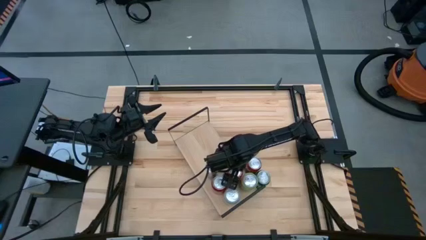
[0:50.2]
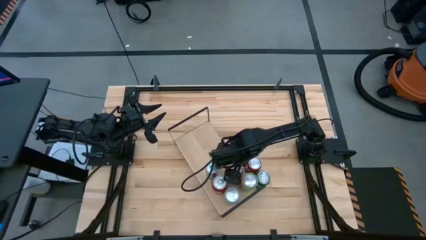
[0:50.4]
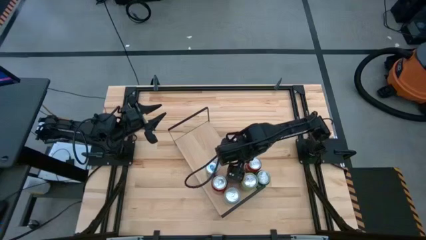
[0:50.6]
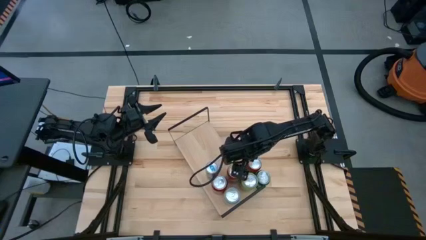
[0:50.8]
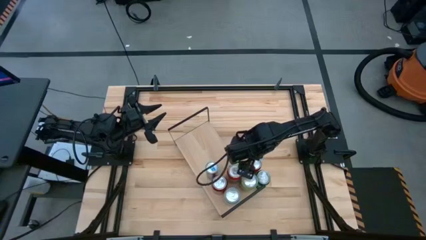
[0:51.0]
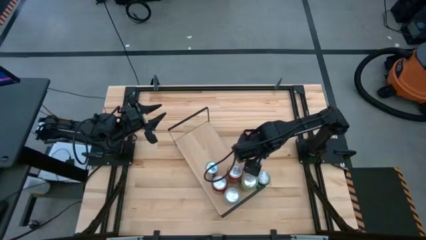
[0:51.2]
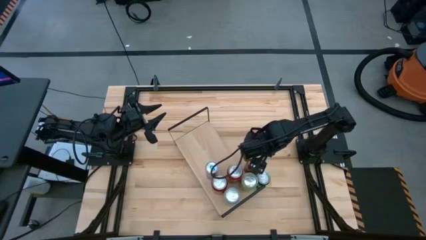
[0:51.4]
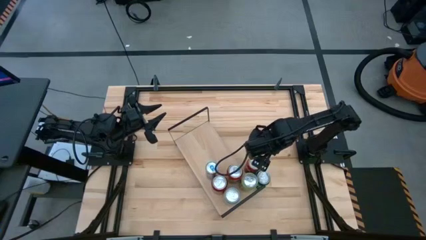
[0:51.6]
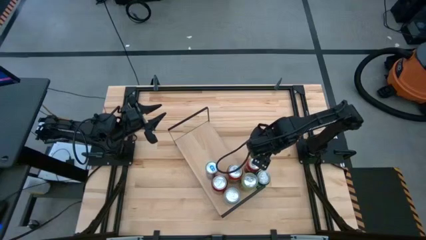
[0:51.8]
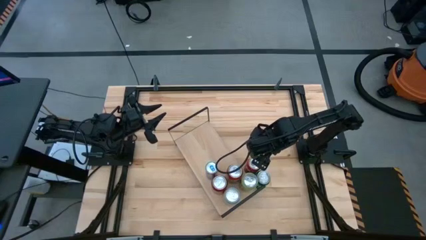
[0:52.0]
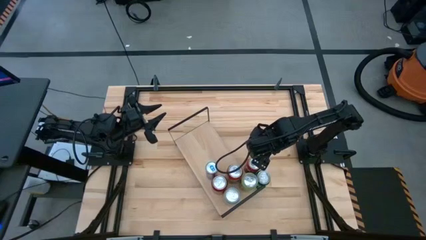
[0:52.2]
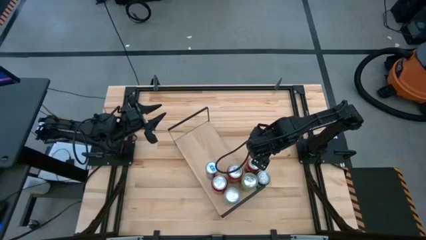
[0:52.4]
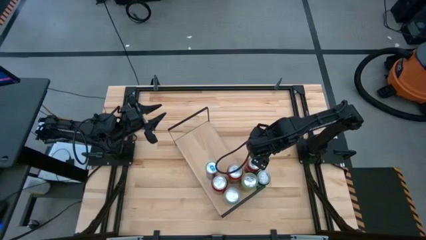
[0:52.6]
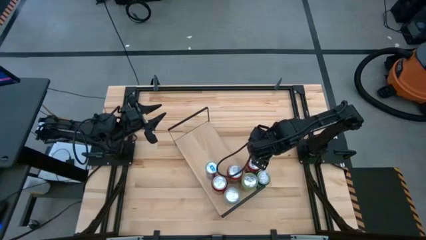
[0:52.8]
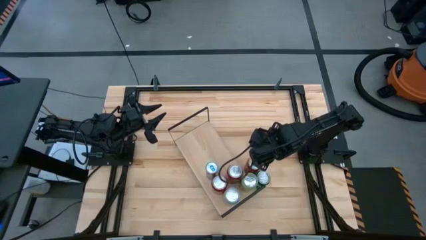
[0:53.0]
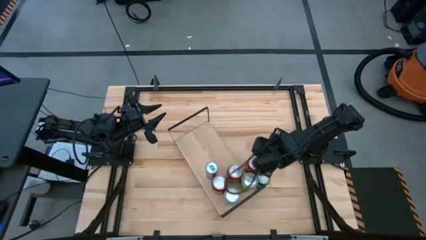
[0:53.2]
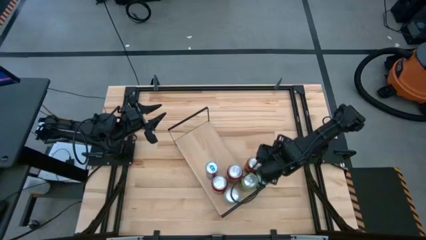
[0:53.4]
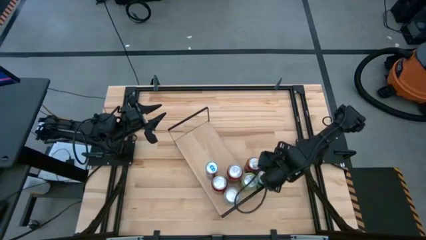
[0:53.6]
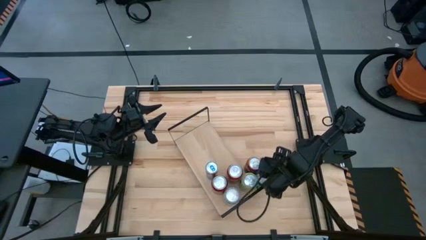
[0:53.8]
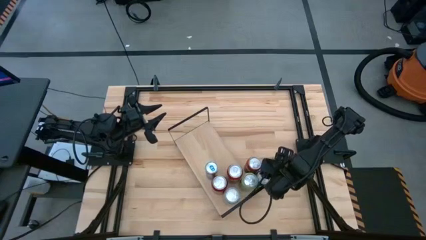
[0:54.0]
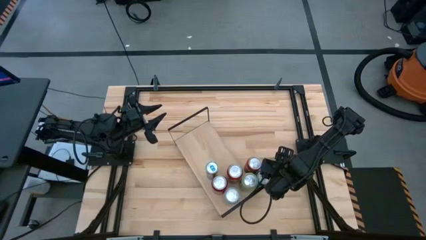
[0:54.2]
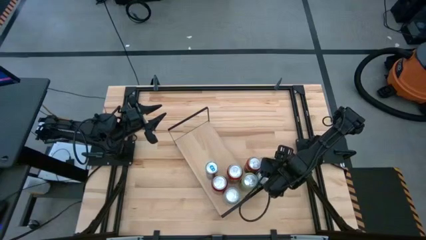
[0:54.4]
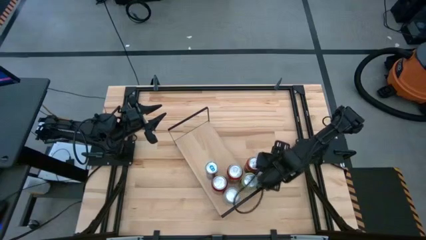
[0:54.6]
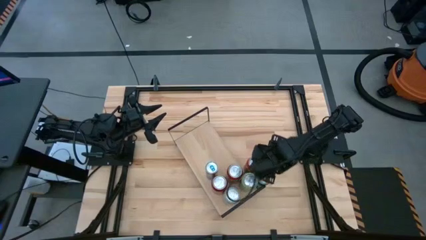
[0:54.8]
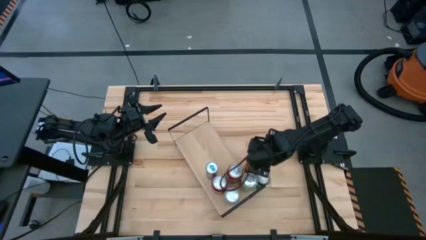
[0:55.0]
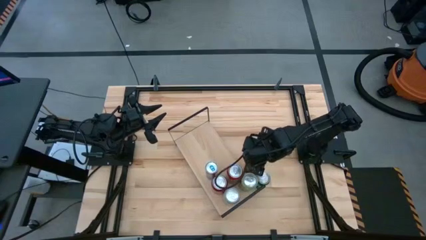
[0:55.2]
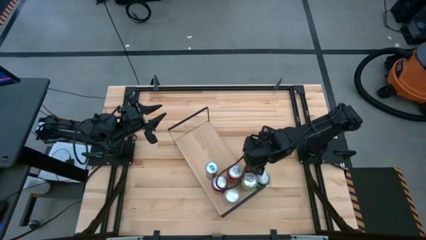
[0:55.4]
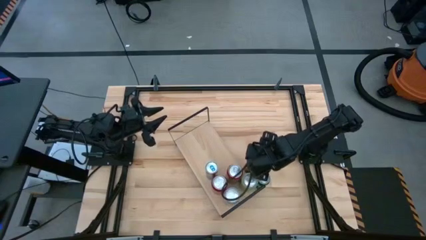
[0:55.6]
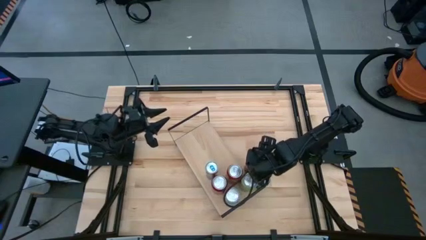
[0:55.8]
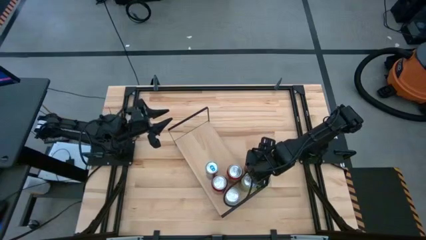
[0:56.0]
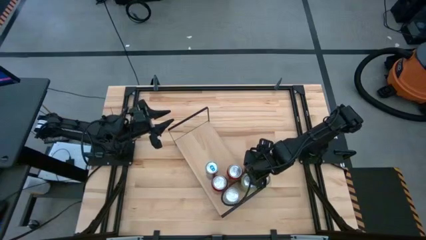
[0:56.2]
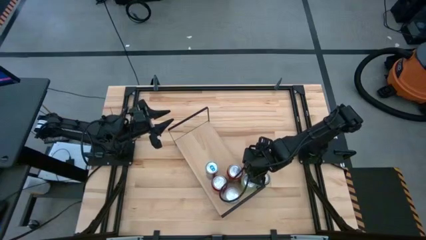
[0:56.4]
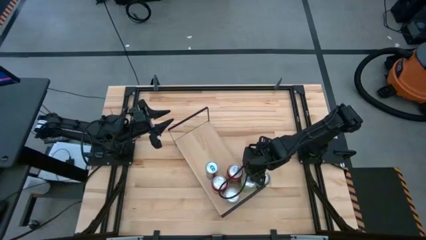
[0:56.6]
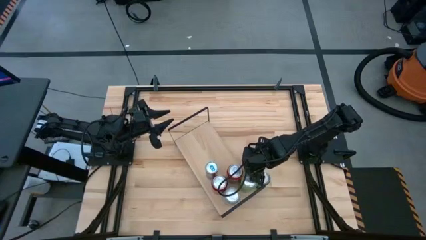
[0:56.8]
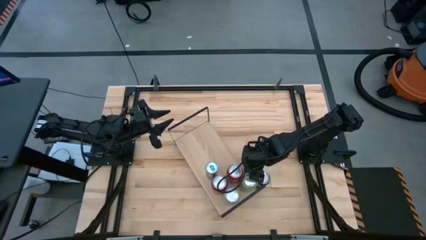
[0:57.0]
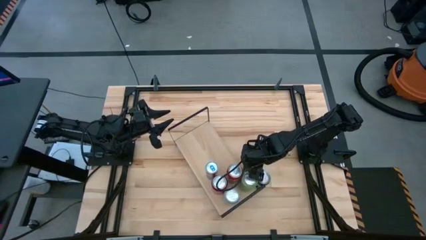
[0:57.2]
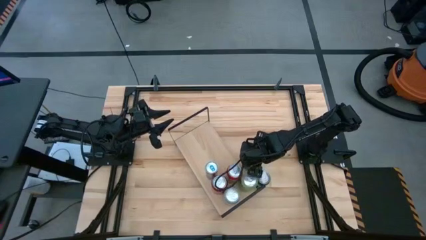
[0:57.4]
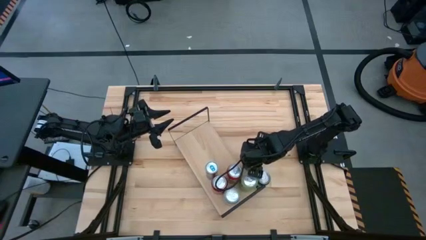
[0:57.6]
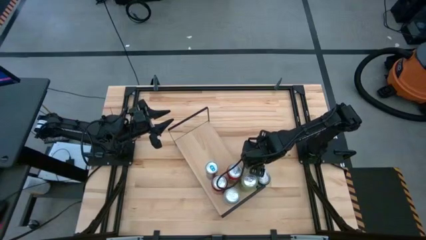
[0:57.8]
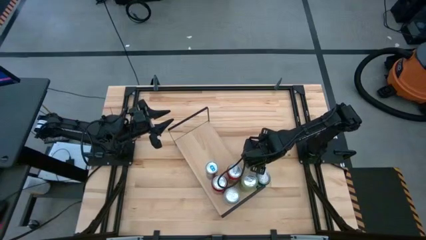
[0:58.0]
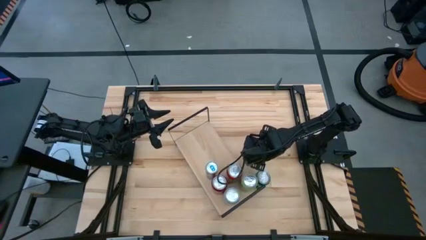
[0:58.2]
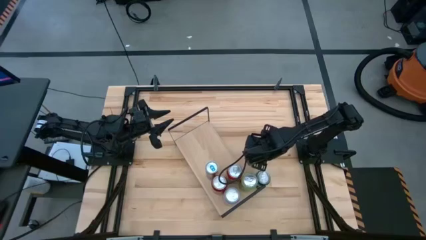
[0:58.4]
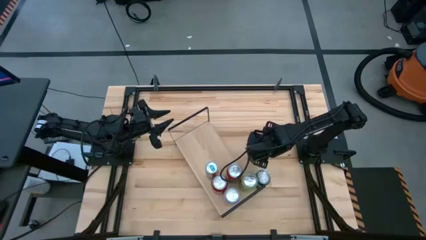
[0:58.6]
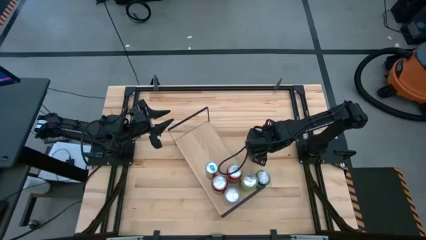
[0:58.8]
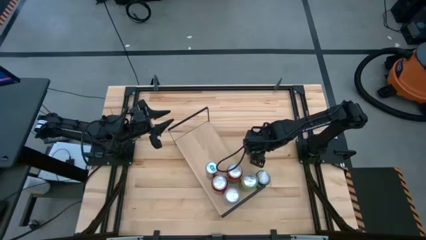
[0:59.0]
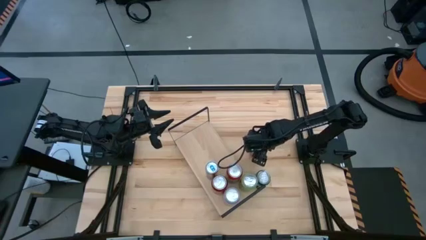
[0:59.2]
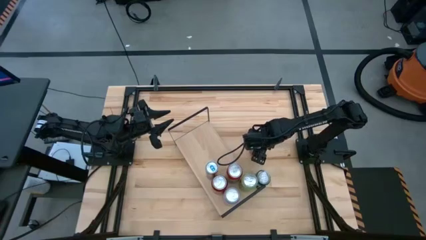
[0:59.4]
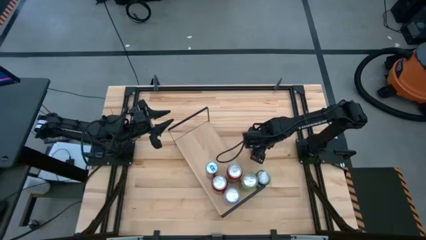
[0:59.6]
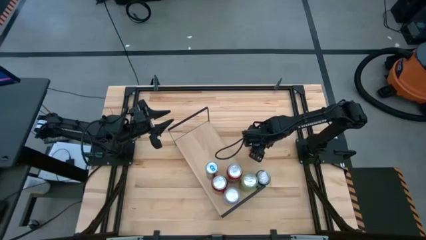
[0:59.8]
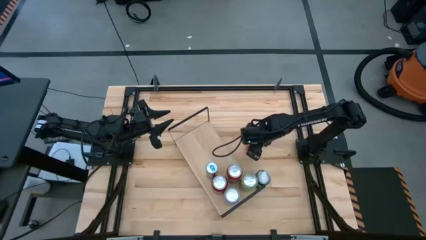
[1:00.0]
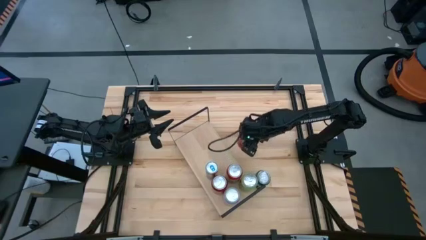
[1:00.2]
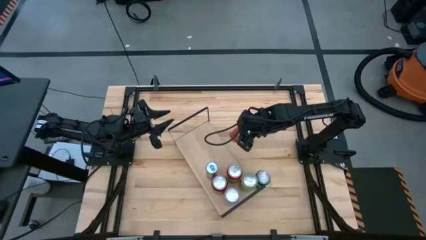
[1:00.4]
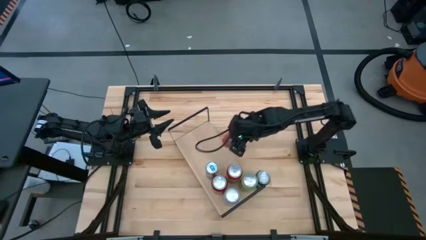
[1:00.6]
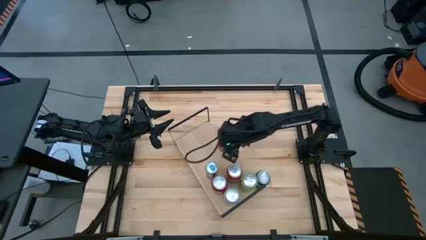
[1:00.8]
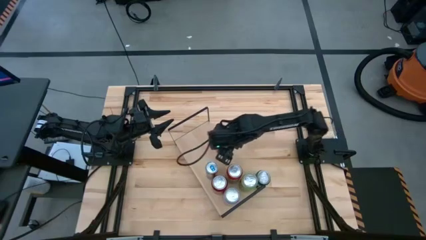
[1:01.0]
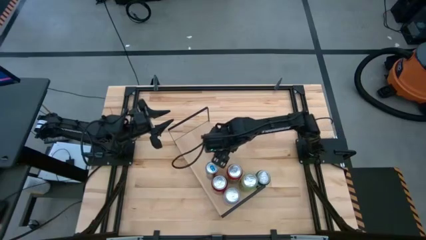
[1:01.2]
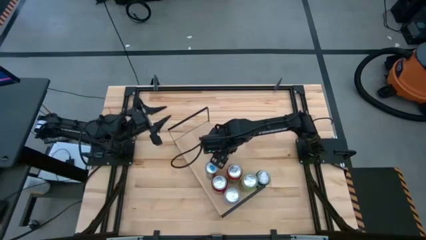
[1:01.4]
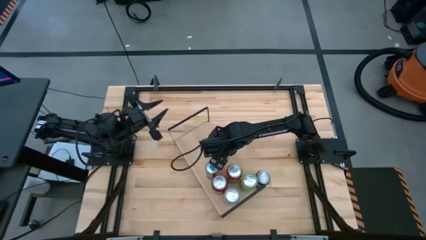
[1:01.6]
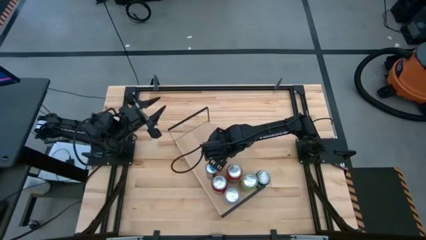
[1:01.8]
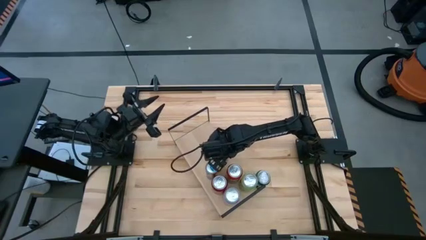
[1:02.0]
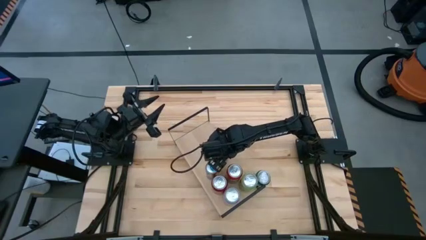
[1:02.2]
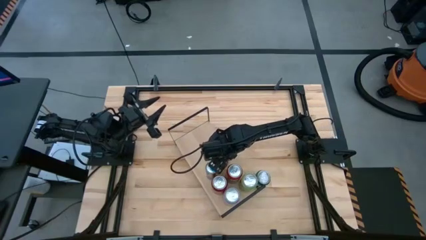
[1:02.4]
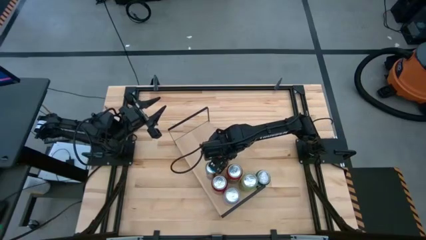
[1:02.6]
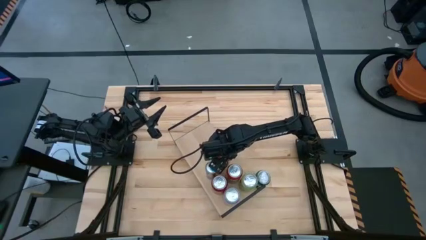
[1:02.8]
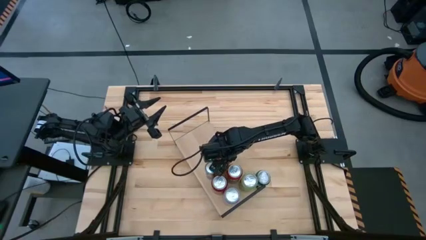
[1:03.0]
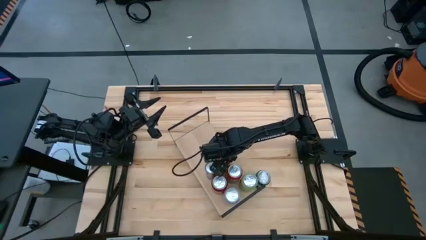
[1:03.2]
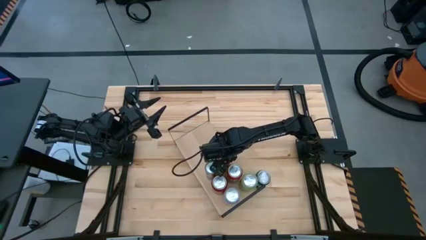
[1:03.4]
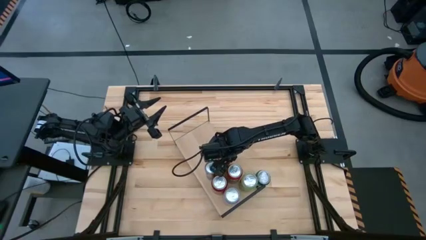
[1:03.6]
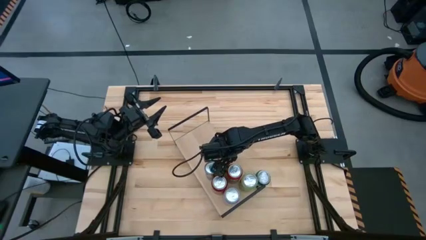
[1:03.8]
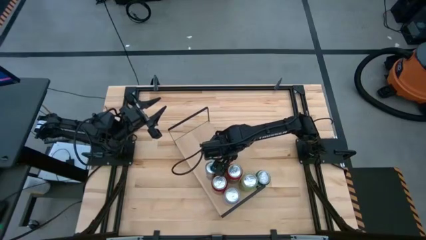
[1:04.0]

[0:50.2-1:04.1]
Task: Place canned beverage on shelf
Put the orange soda can on the shelf

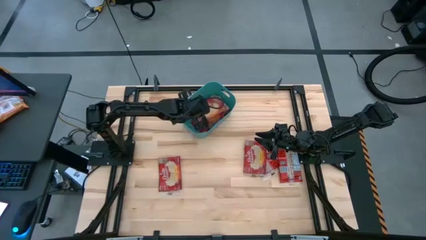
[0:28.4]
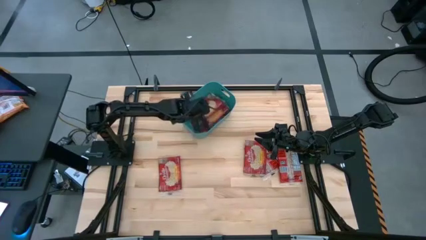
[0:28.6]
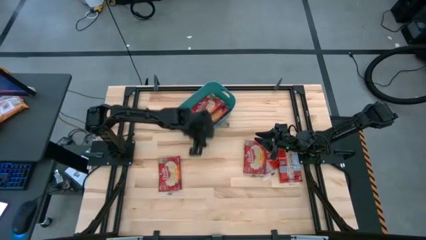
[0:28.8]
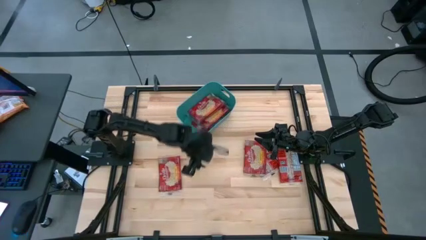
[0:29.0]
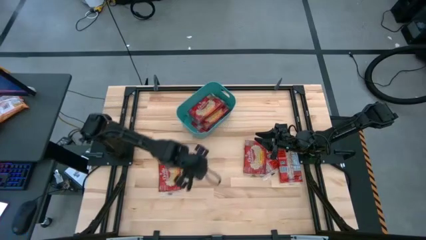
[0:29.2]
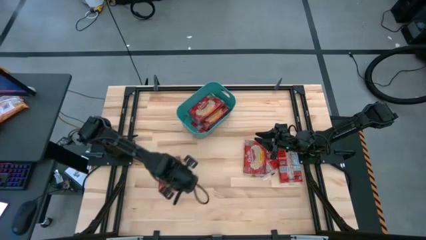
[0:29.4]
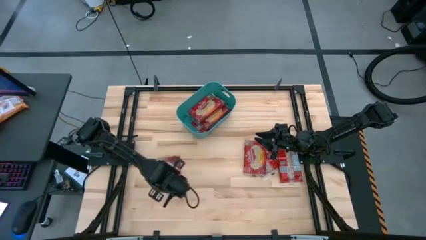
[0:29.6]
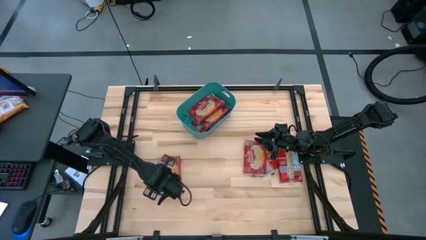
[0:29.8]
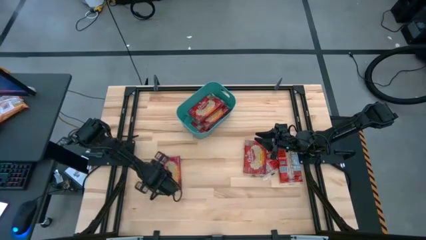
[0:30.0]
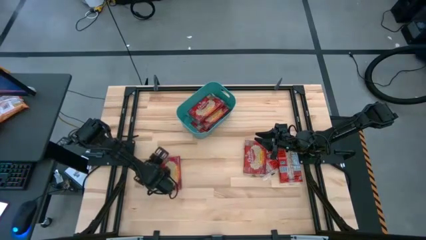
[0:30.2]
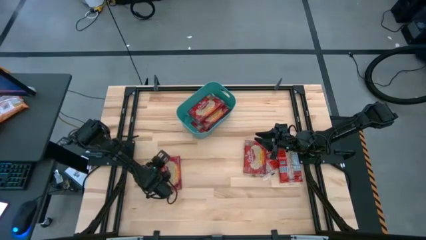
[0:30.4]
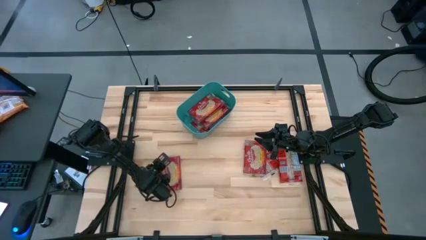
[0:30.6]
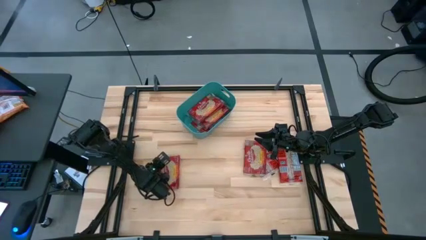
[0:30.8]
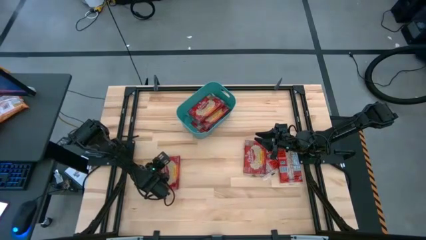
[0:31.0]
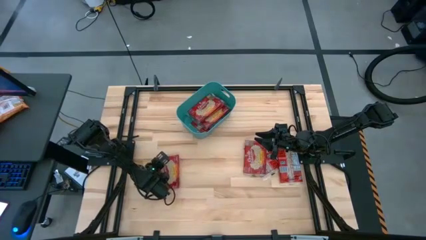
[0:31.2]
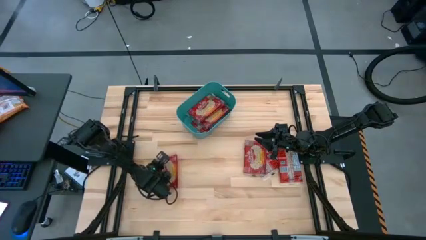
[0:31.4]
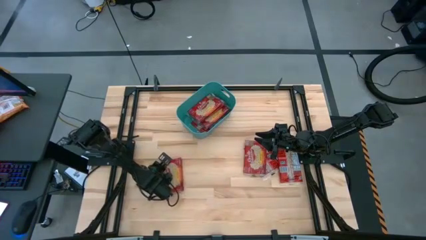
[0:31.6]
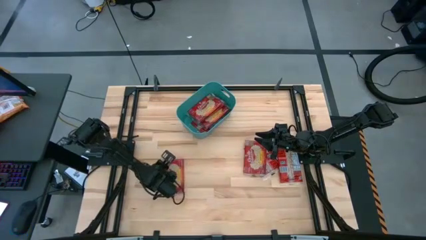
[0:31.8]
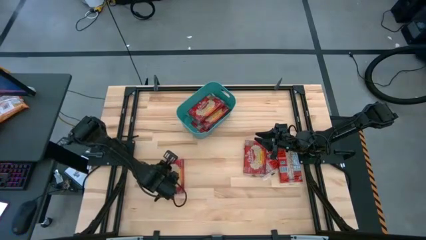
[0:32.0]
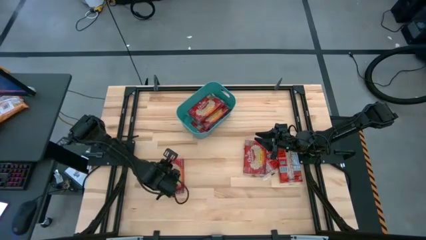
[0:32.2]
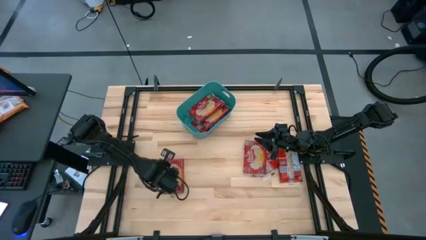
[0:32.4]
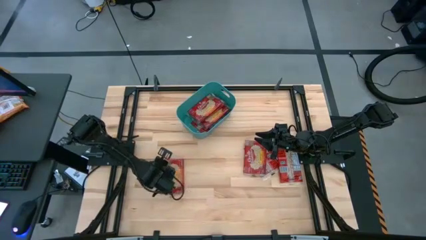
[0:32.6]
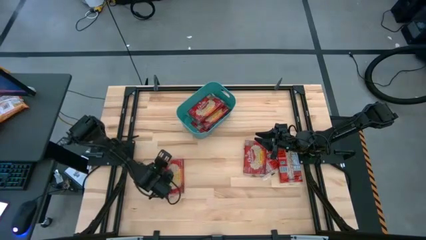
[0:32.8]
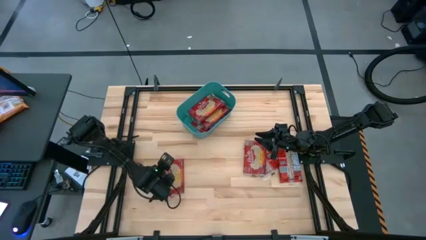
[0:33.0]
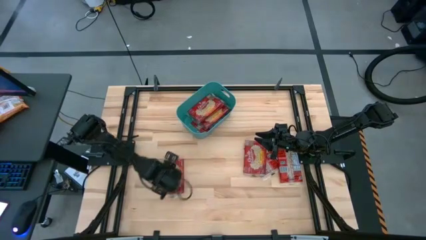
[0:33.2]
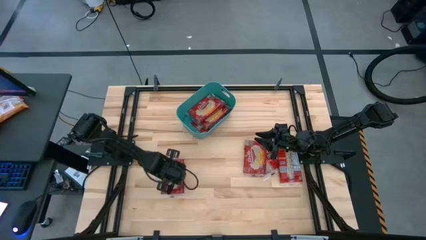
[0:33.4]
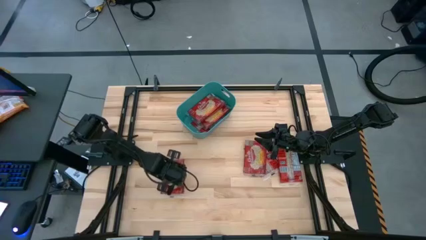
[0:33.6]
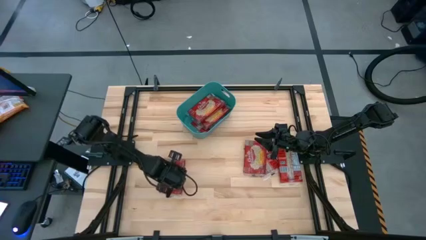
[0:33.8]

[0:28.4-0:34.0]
Task: Sort popcorn bags into baskets
Put the red popcorn bag into the green container
